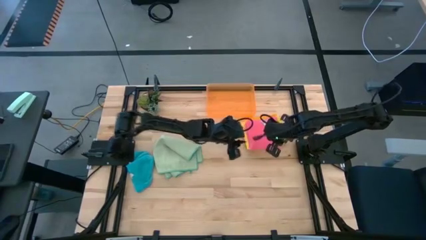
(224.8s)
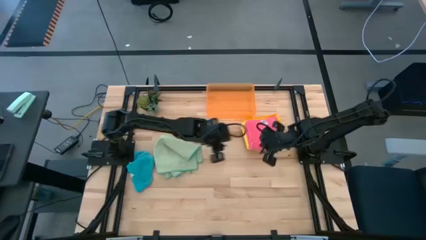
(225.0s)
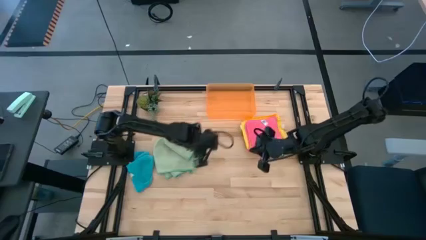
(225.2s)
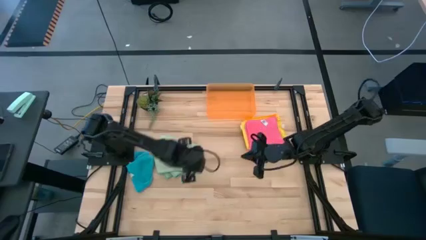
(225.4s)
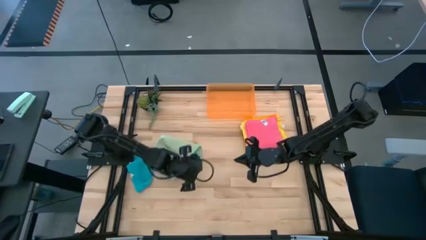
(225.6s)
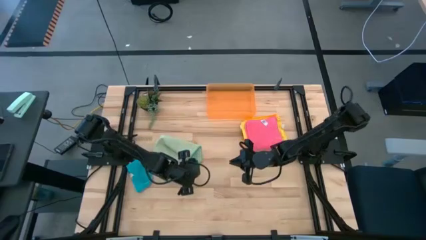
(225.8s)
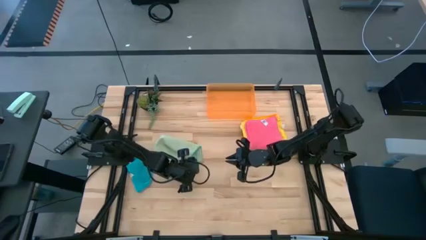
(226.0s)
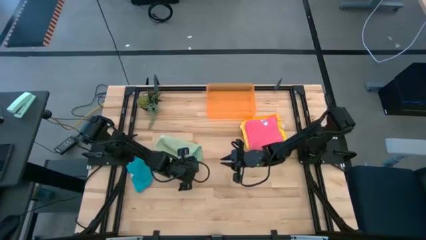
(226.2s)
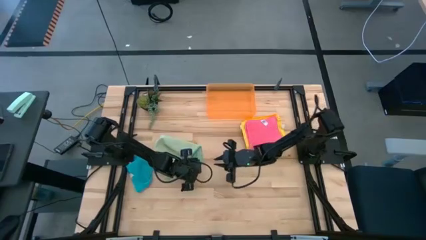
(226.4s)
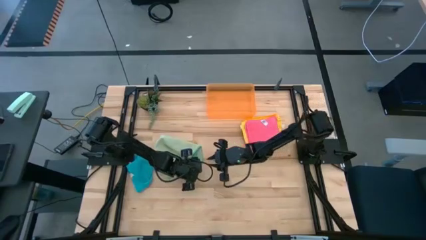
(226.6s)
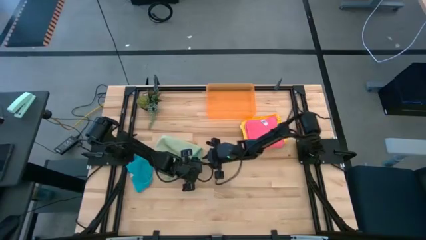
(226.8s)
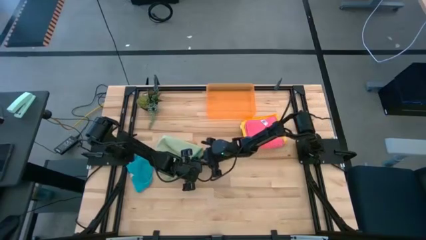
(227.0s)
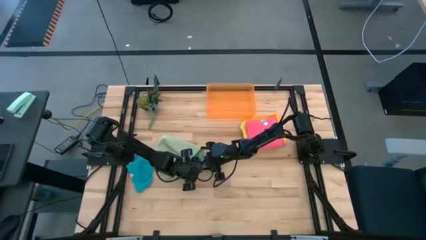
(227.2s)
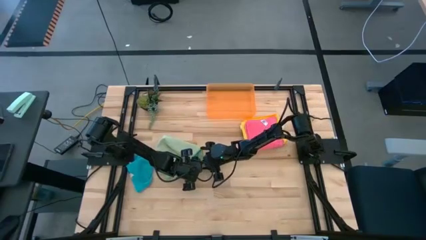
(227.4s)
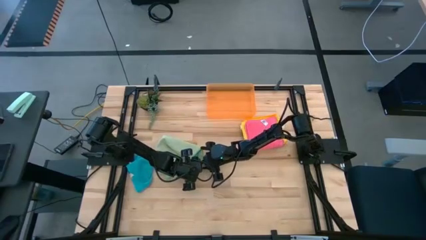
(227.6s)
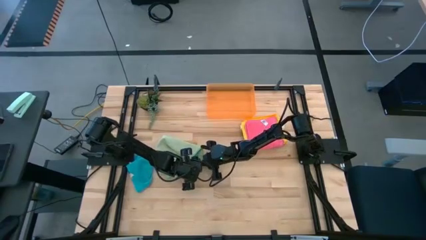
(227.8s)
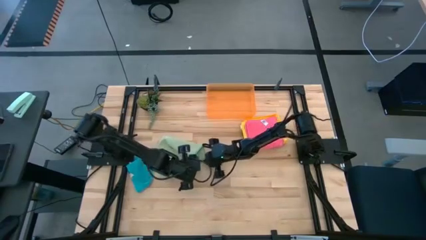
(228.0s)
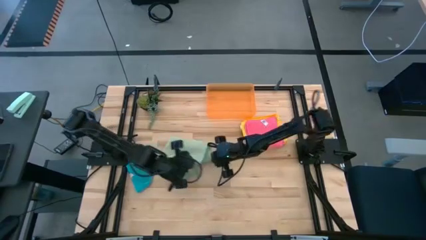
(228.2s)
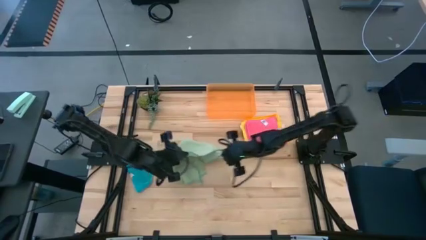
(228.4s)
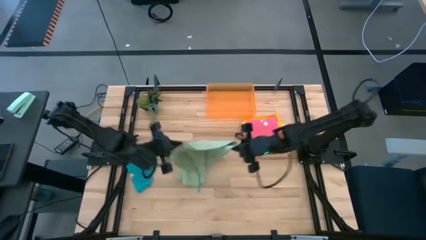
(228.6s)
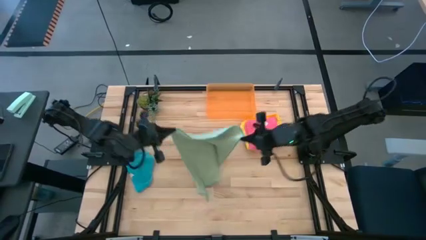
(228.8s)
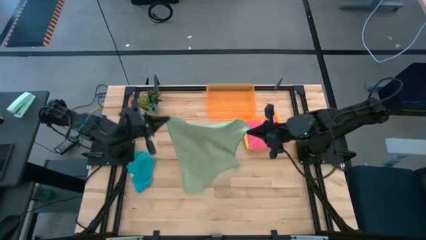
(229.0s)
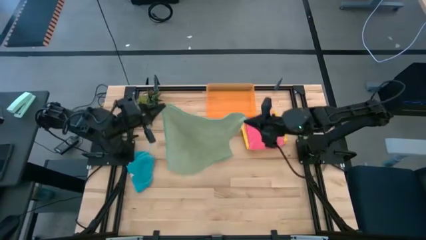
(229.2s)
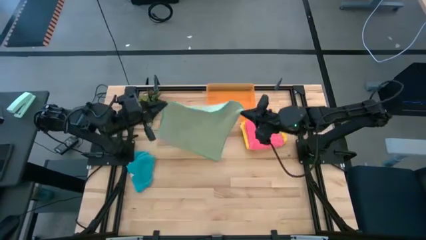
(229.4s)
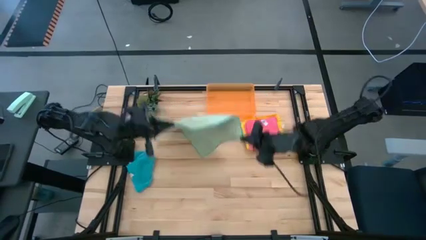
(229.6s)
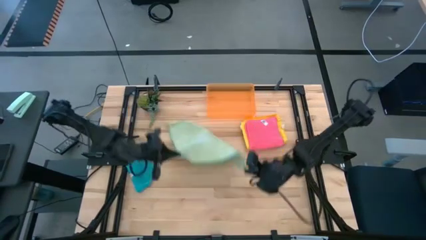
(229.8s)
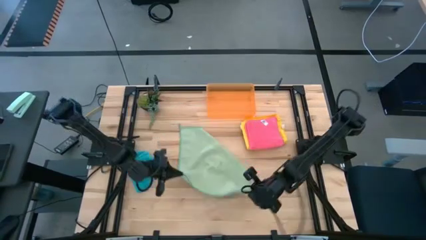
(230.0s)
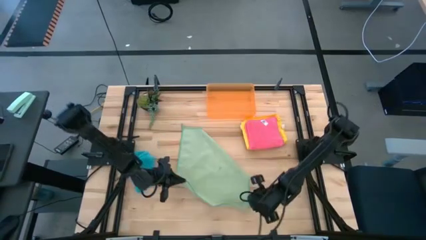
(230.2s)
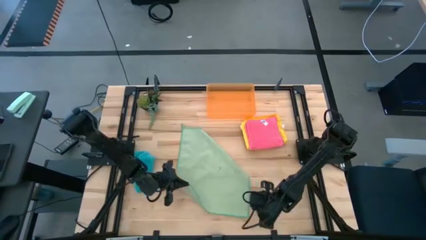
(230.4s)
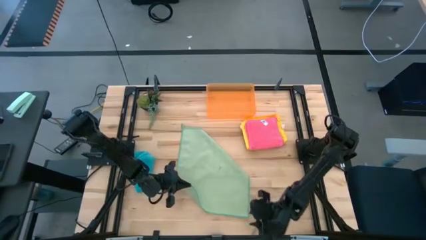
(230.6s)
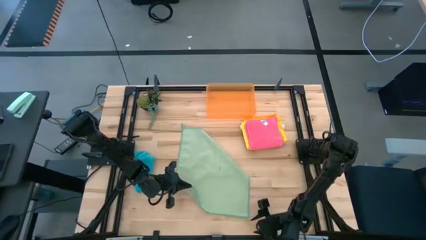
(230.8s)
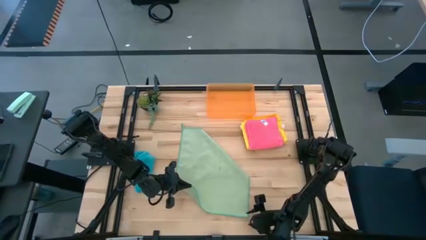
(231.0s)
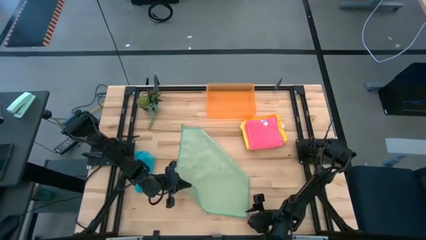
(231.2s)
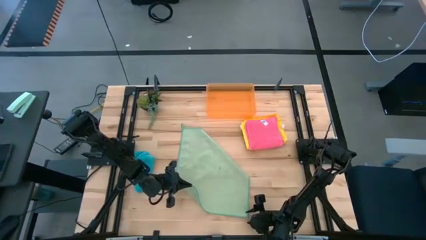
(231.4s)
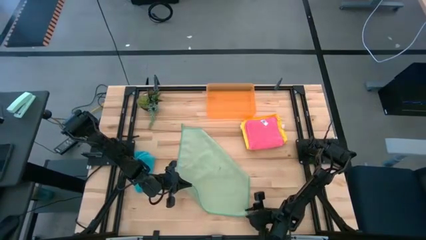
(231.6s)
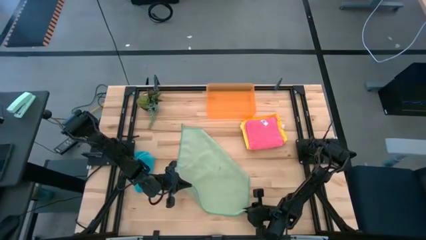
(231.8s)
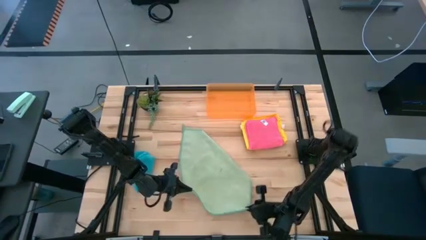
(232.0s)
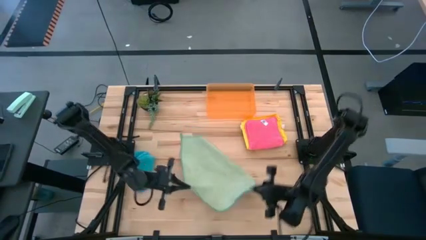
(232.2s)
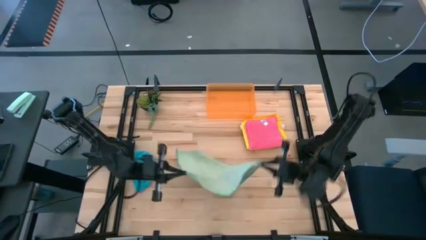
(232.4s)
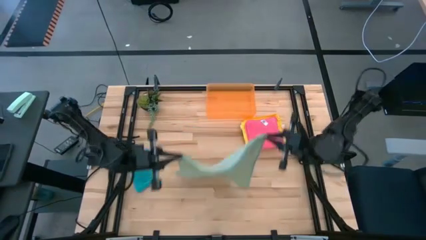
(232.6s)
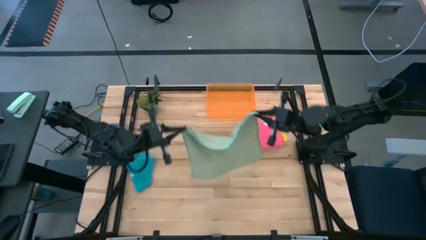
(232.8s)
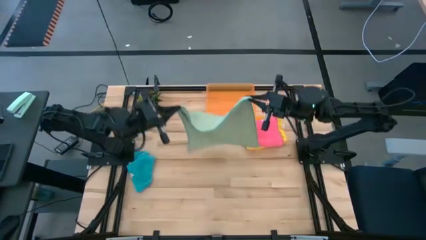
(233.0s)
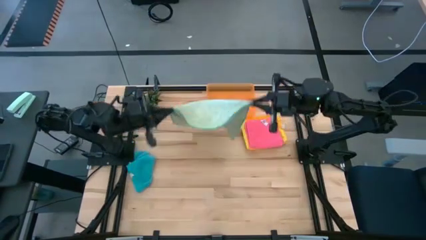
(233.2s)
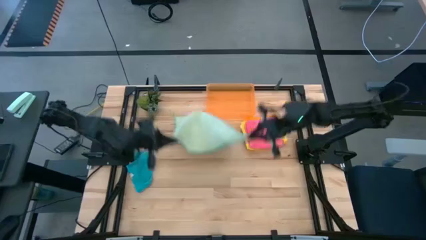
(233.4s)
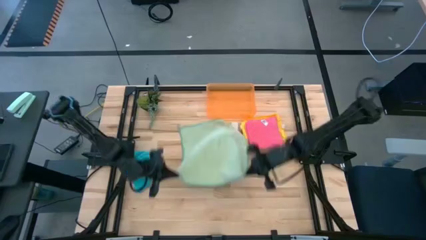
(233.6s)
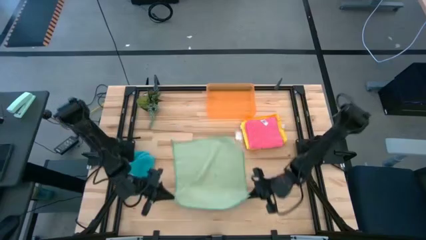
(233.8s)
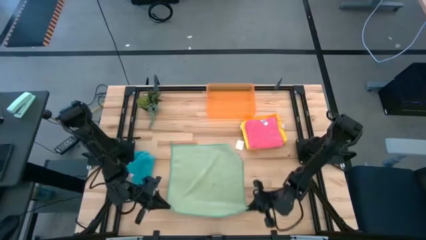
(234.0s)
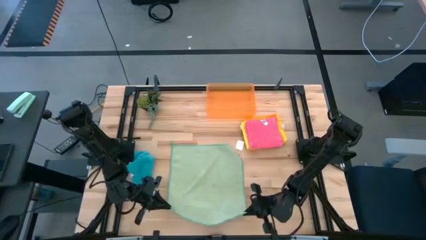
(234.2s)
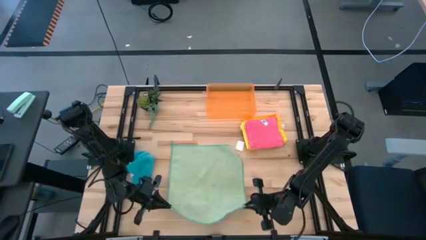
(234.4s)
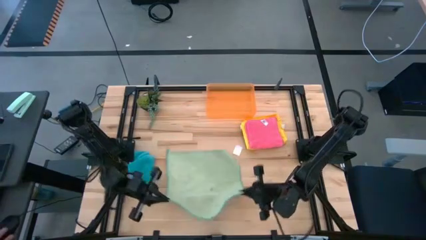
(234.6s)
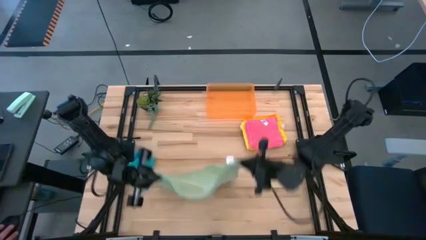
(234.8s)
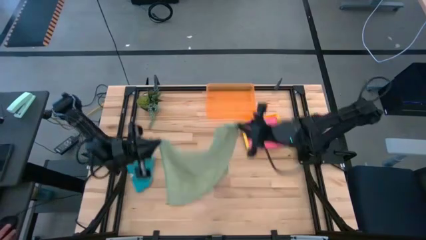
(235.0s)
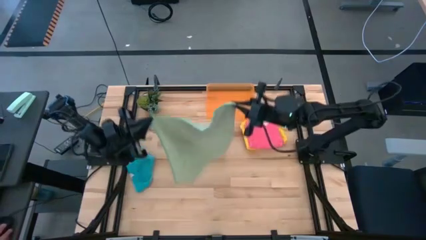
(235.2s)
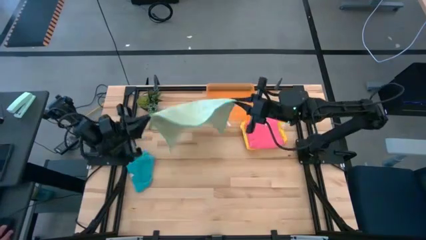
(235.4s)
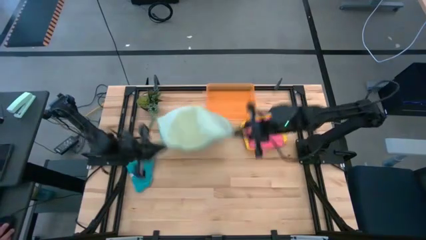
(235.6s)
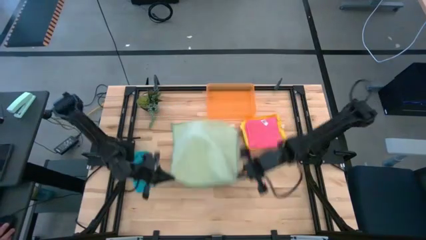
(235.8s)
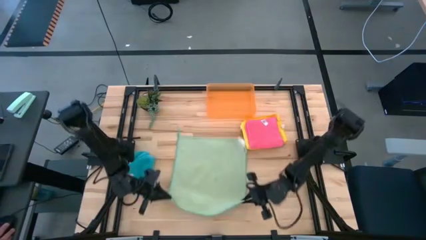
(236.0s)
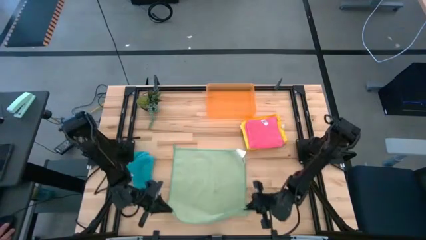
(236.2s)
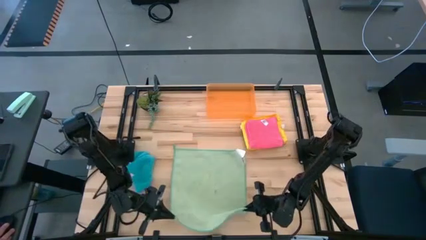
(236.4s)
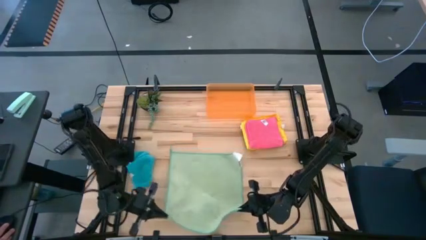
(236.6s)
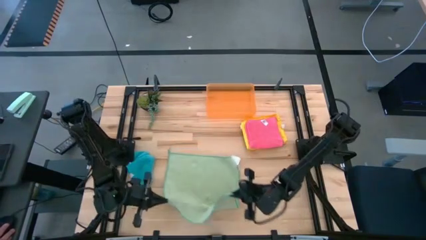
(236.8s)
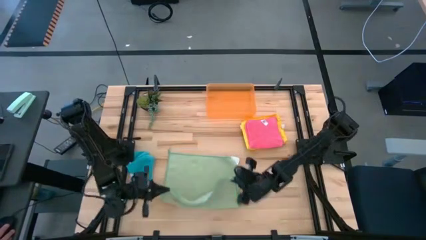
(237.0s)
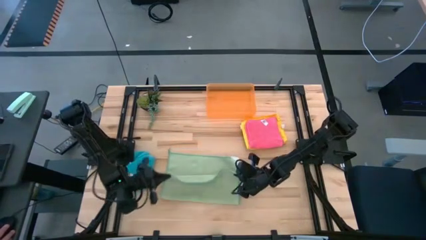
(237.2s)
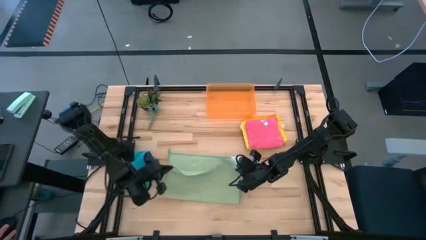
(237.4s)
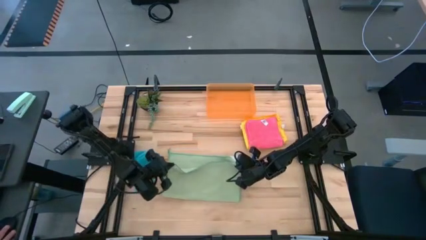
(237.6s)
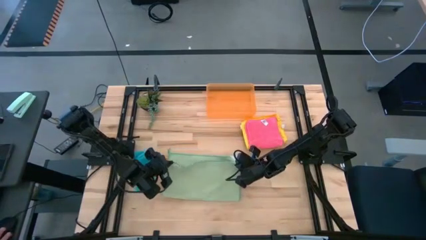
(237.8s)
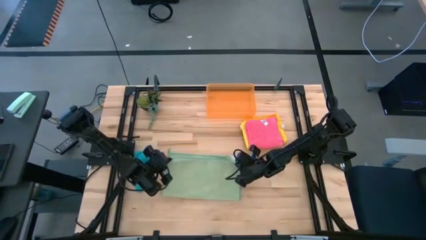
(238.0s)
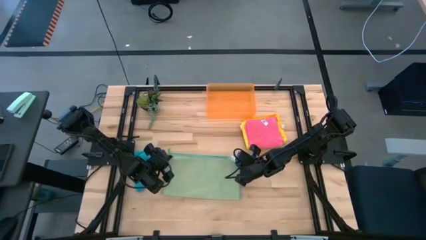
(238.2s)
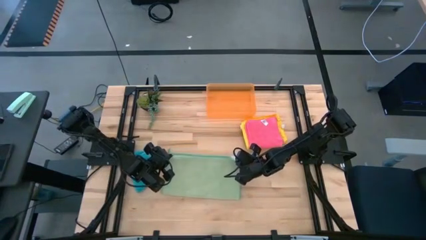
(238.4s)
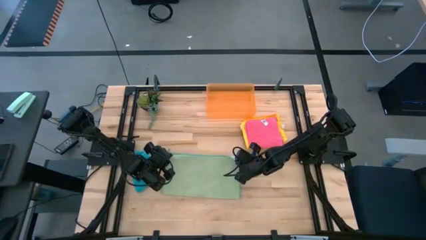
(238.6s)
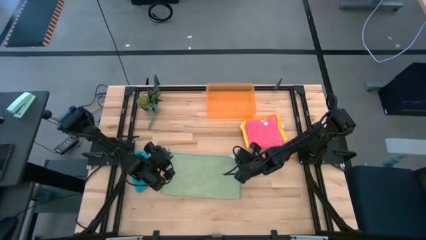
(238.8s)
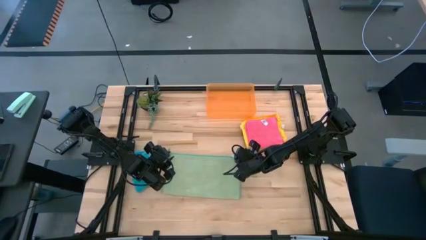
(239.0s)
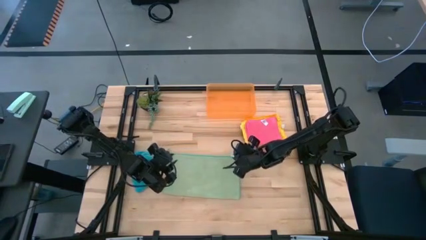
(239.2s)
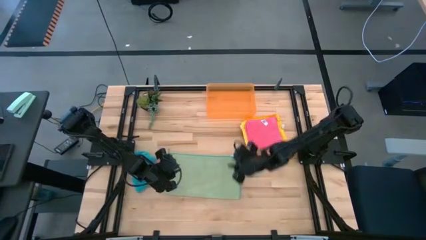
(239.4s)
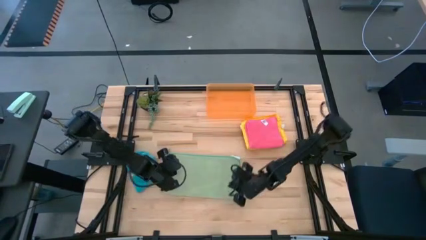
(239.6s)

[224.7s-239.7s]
Task: Fold microfiber towels
Fold the green microfiber cloth

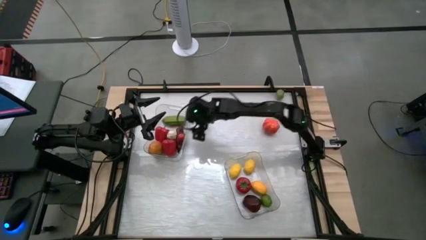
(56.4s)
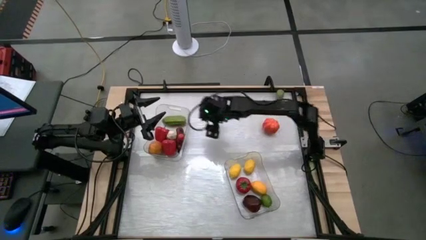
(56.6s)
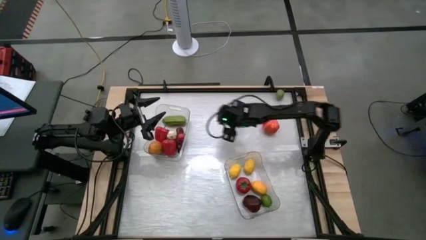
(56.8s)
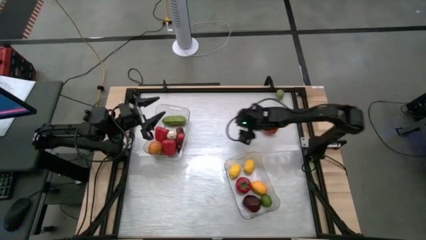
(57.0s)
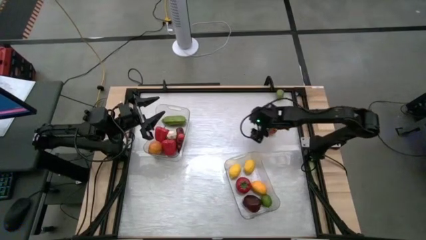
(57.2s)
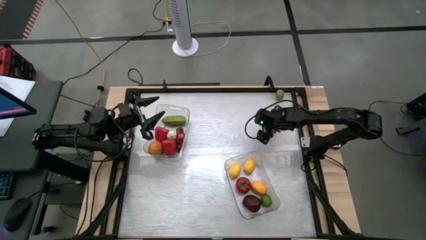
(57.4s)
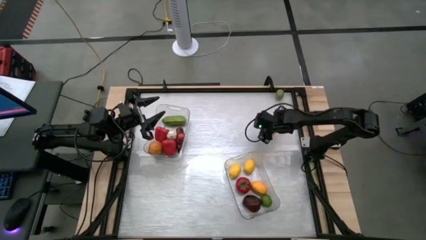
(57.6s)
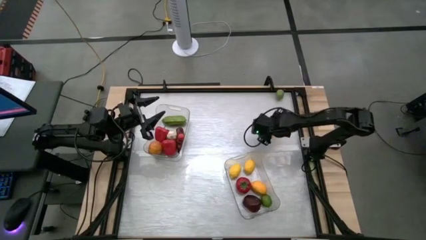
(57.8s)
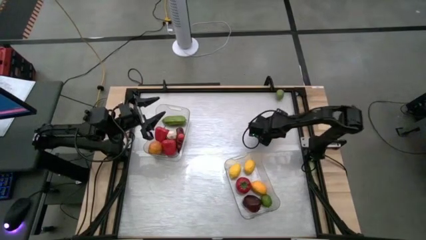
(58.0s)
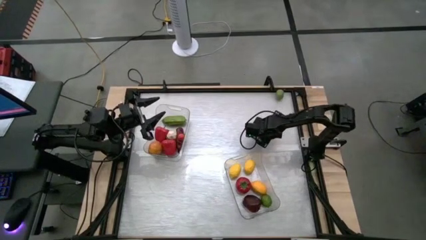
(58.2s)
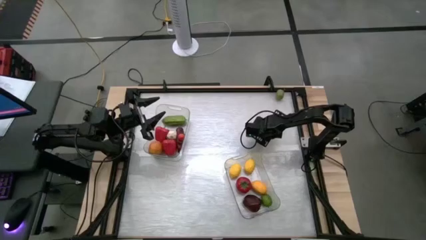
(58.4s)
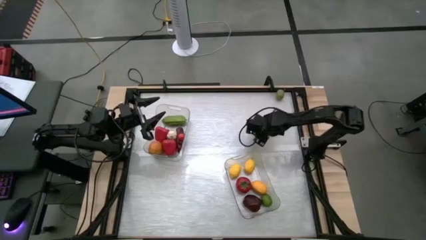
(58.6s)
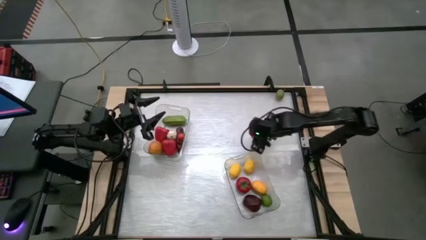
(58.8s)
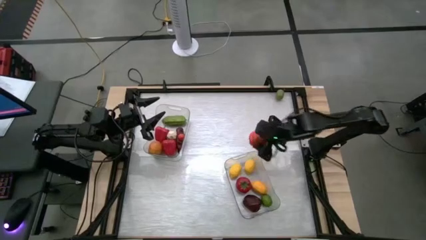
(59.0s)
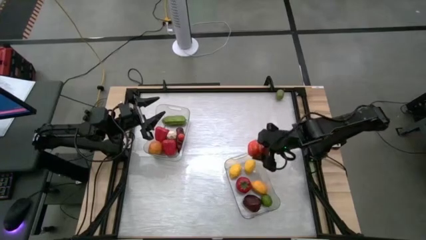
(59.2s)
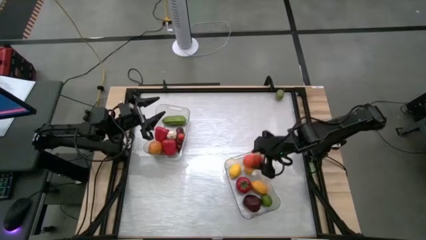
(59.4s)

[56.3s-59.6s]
Task: Sort produce into baskets
Put the orange squash into the right transparent bin
